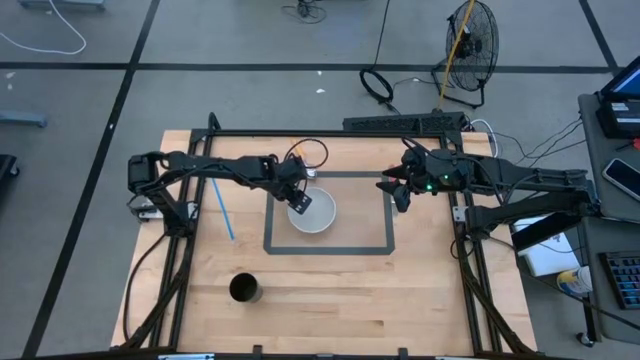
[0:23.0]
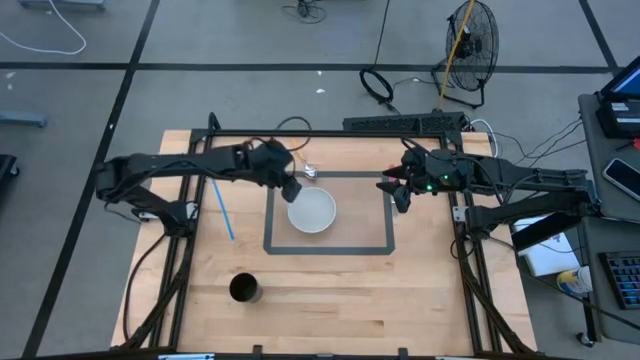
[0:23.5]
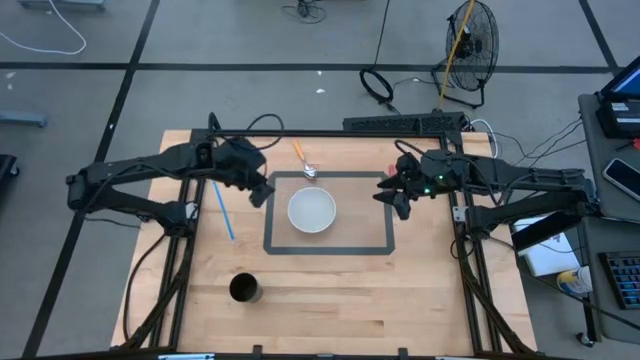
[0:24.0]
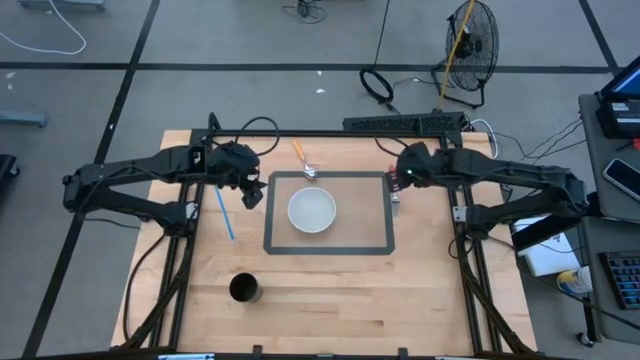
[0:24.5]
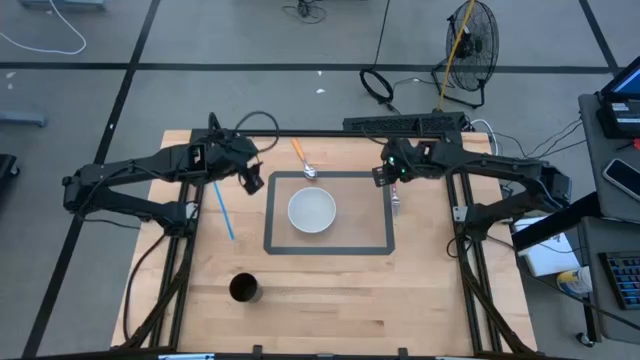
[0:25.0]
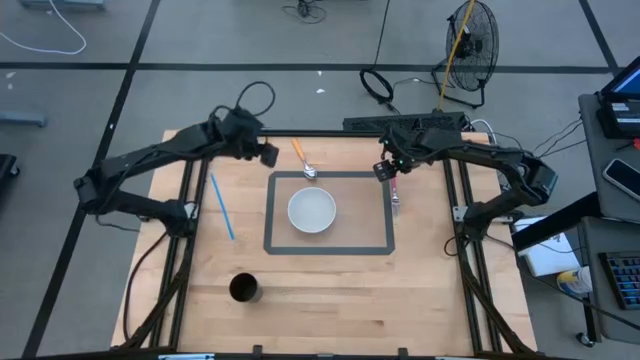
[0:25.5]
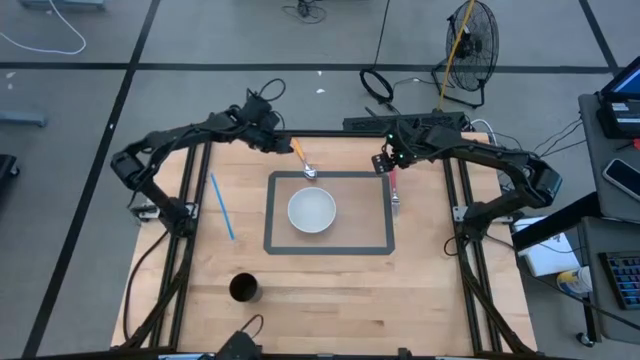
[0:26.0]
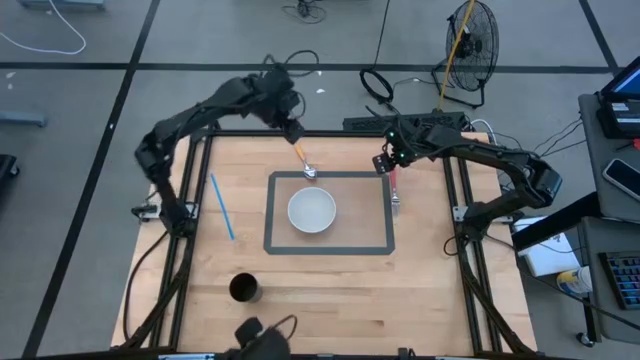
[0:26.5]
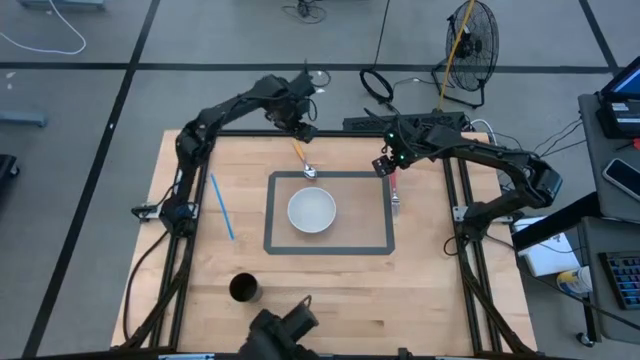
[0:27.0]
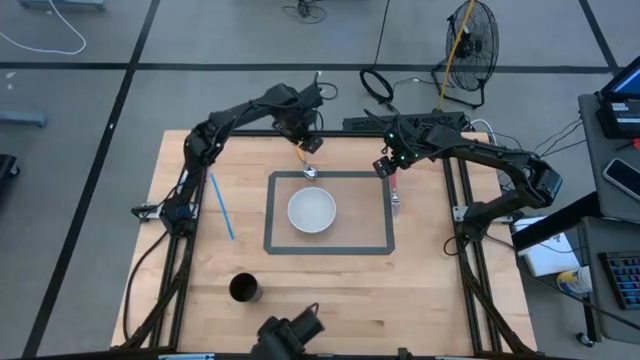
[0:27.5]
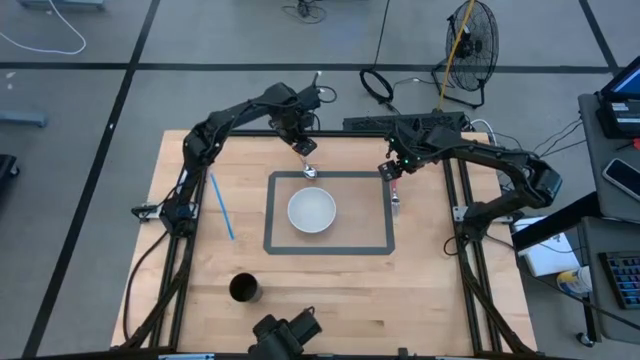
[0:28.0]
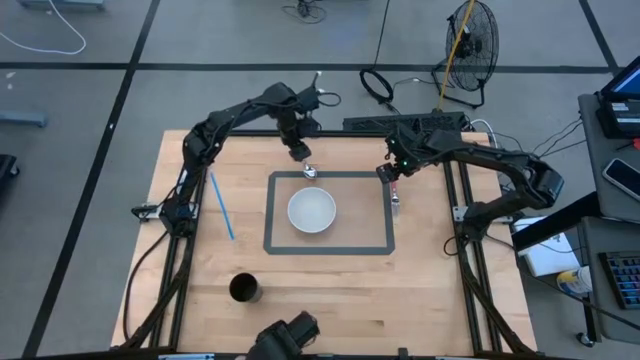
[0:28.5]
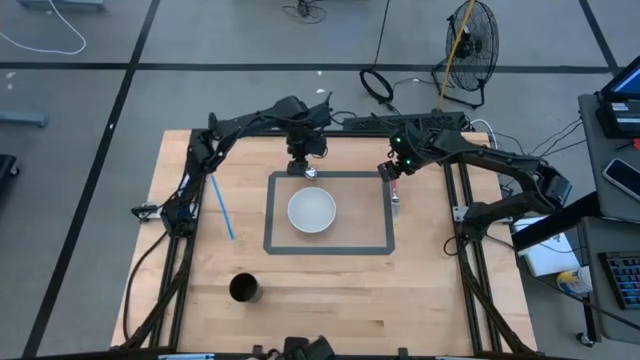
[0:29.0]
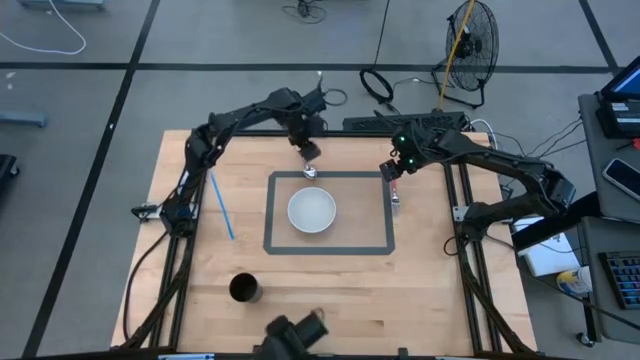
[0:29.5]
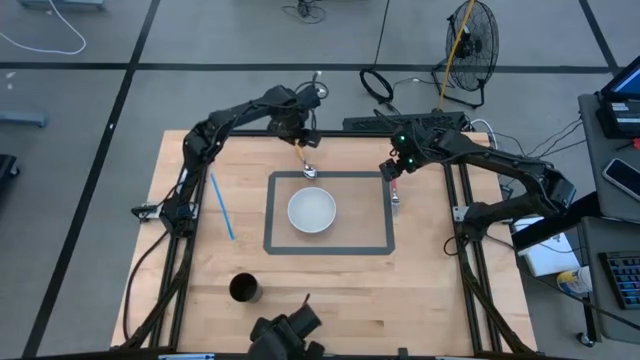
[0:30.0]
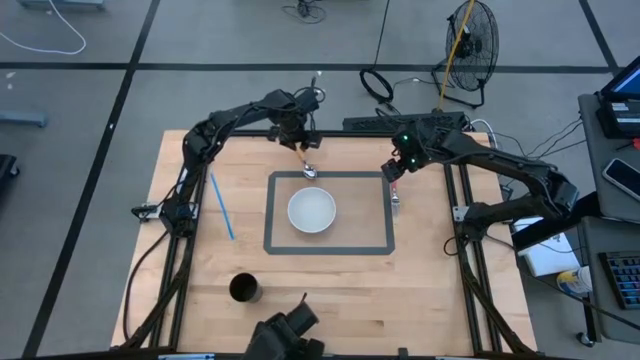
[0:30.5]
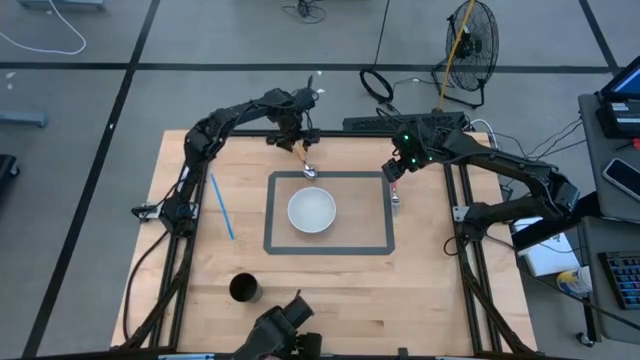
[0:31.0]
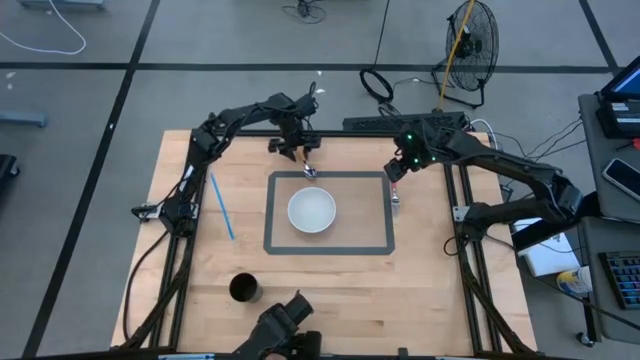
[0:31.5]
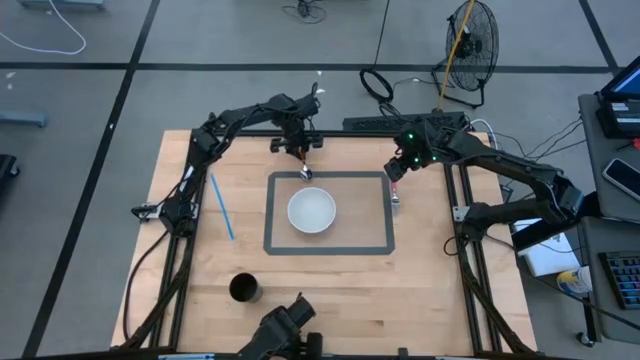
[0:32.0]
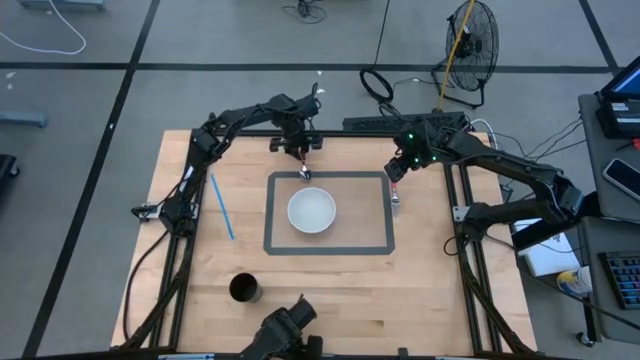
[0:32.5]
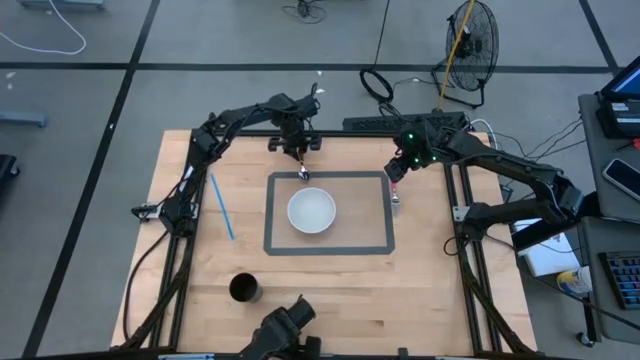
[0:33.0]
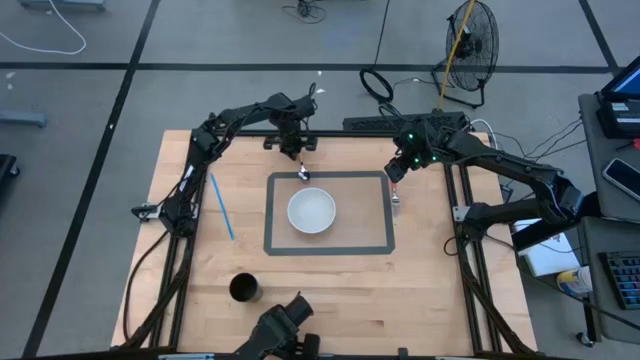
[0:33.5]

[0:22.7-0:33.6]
Task: Pick & Place Utensil
Put the yellow spoon into the bowl on the table mat

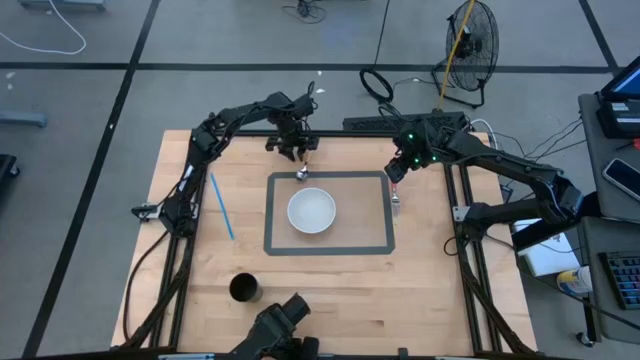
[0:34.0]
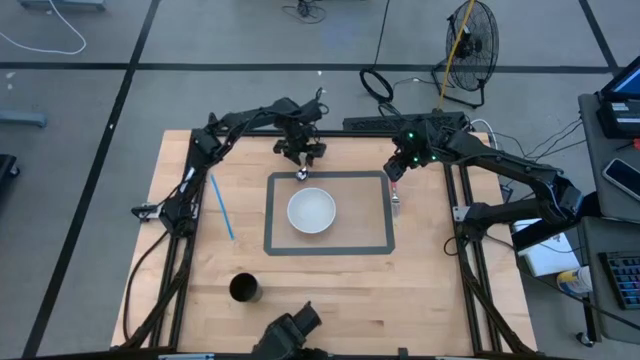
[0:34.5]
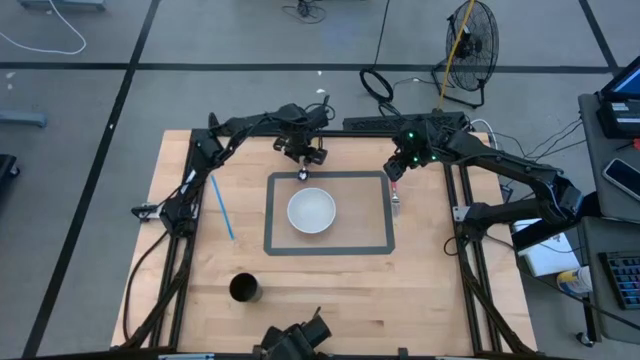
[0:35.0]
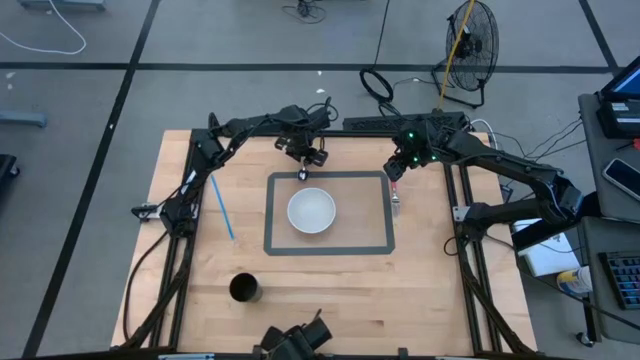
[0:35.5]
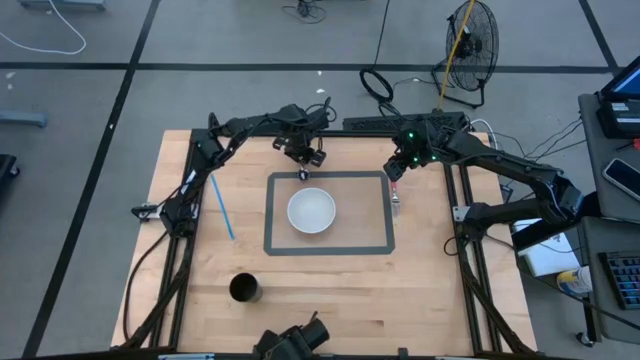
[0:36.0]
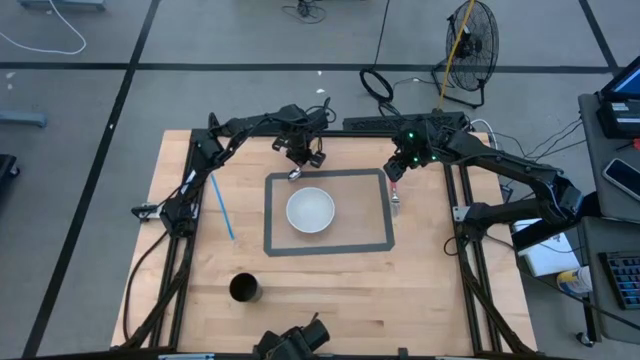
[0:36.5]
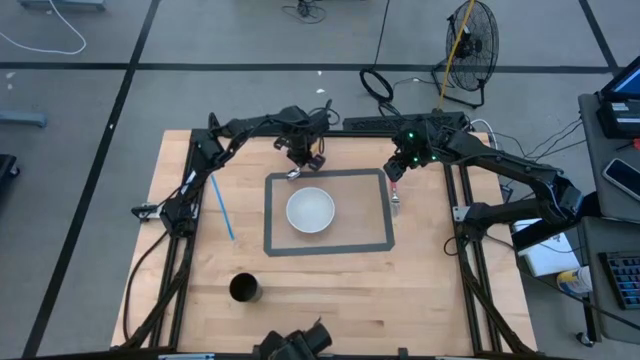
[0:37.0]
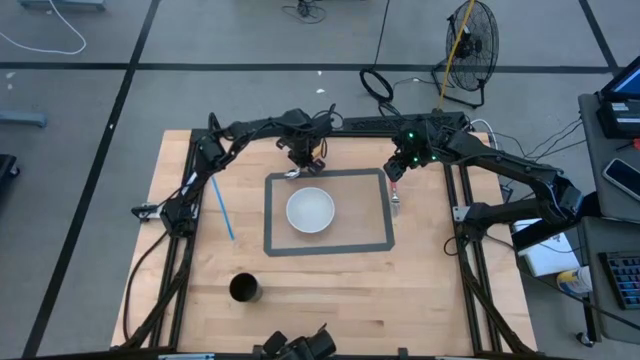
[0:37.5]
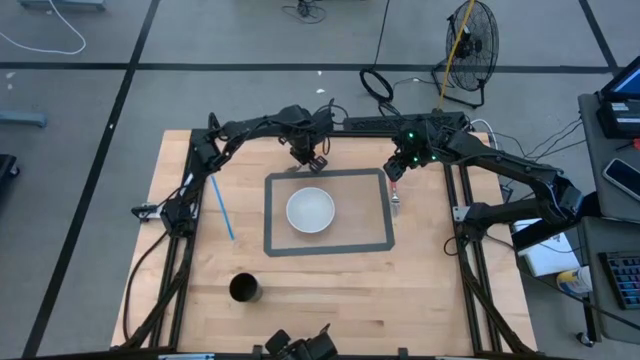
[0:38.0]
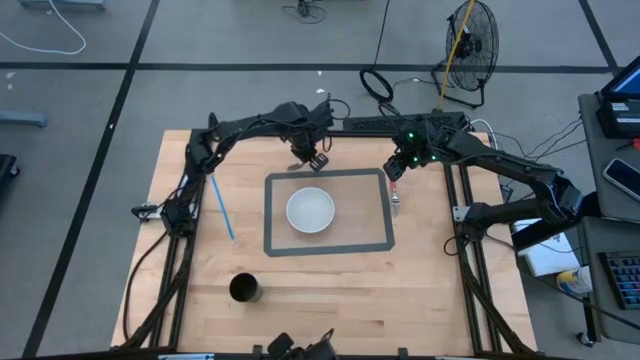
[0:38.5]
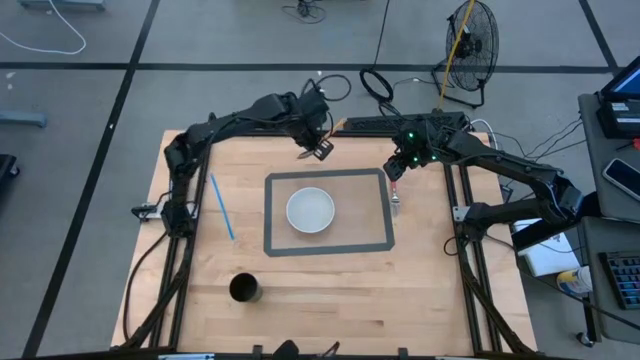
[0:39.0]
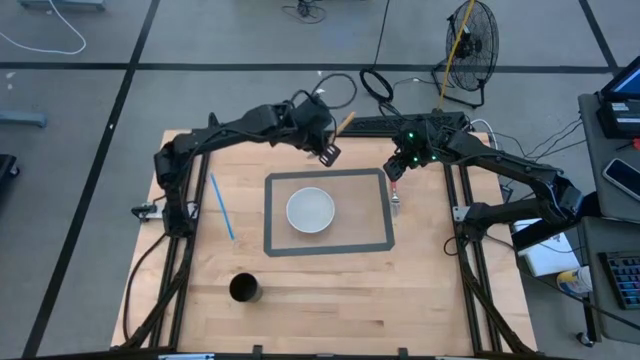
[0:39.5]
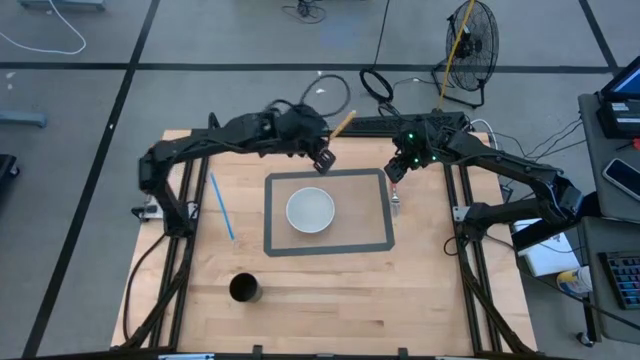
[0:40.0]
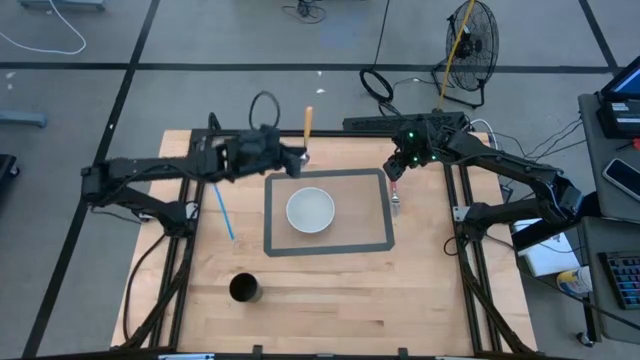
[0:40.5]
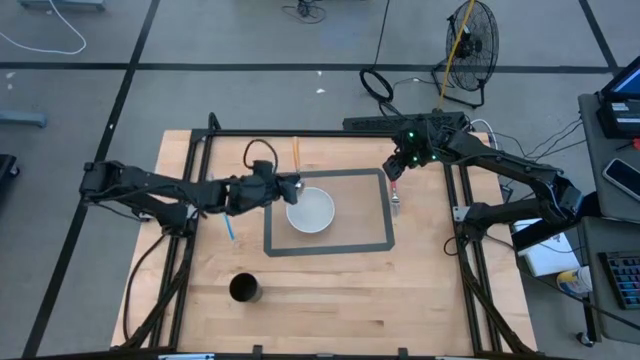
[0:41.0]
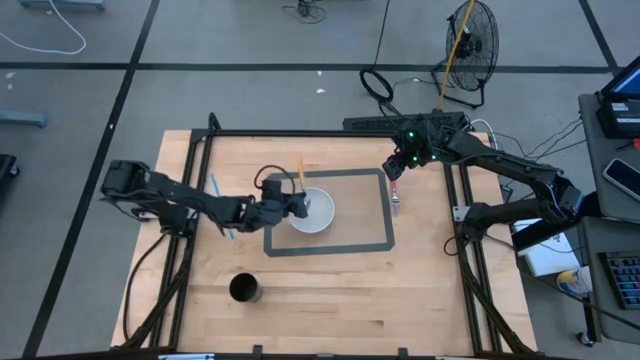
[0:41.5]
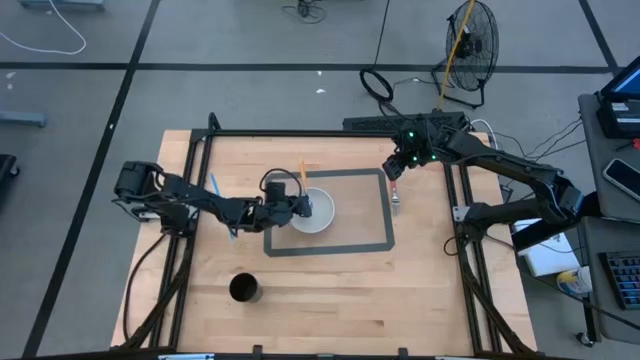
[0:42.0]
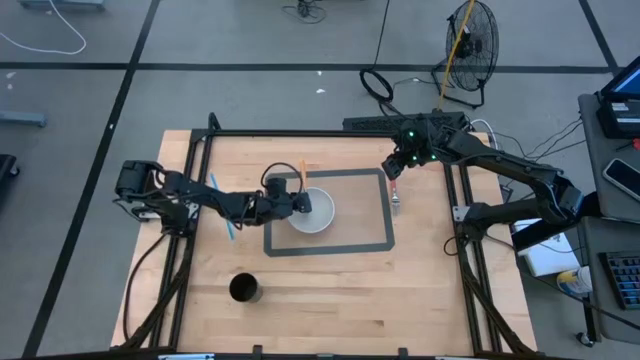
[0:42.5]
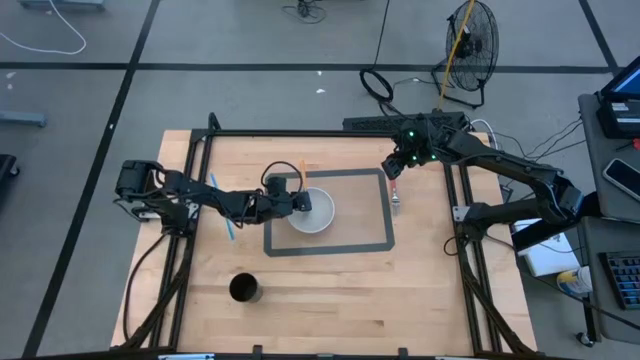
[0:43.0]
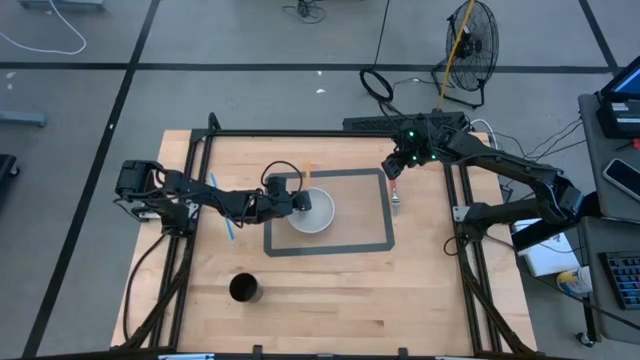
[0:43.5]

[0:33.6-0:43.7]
Put the yellow spoon into the bowl on the table mat
